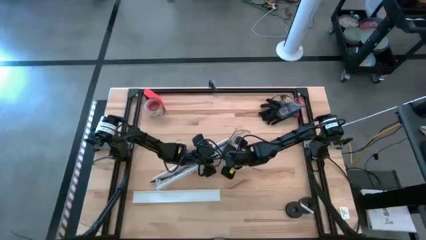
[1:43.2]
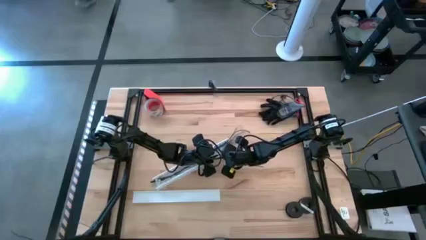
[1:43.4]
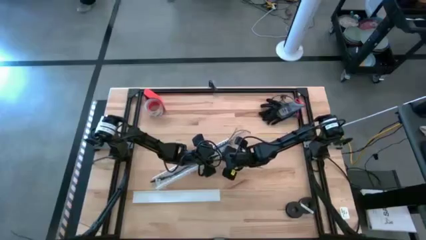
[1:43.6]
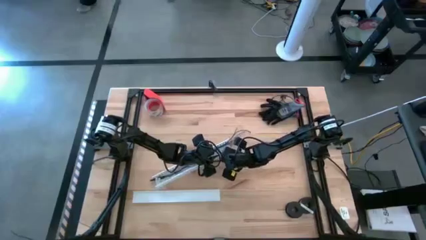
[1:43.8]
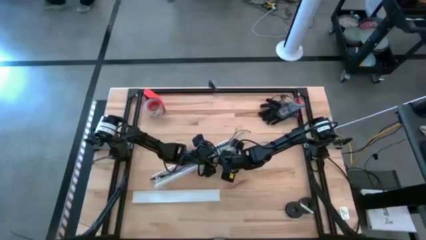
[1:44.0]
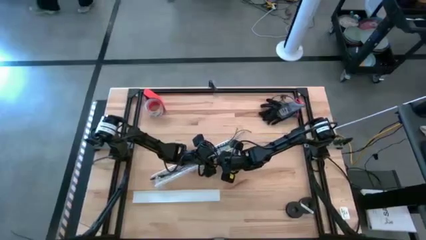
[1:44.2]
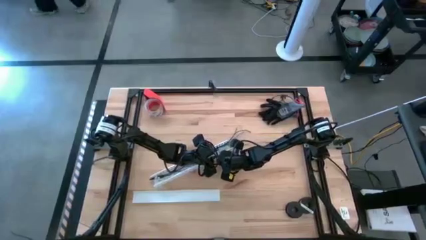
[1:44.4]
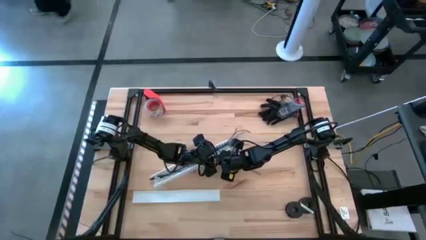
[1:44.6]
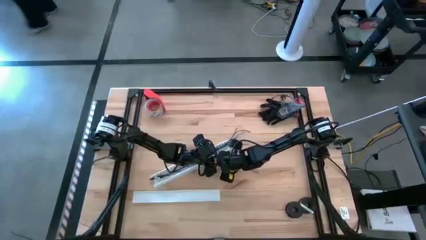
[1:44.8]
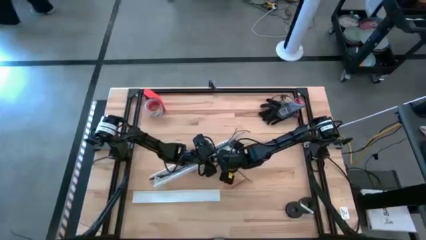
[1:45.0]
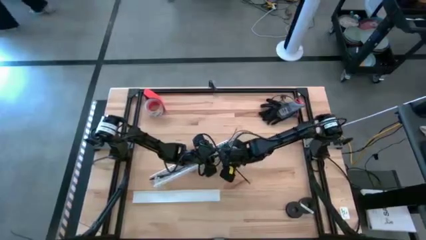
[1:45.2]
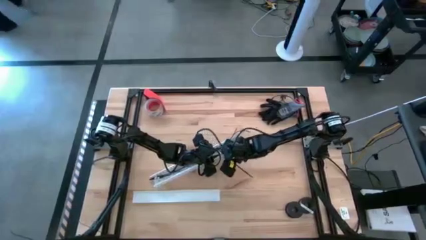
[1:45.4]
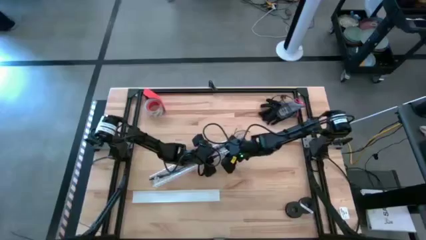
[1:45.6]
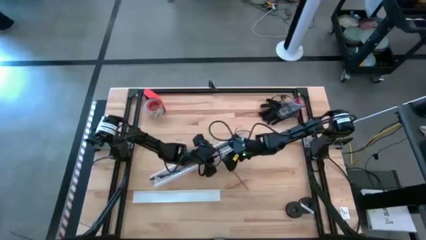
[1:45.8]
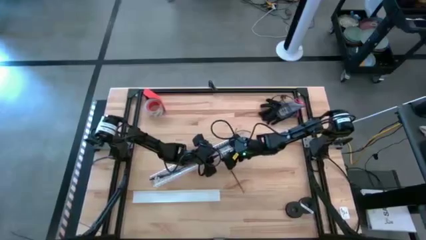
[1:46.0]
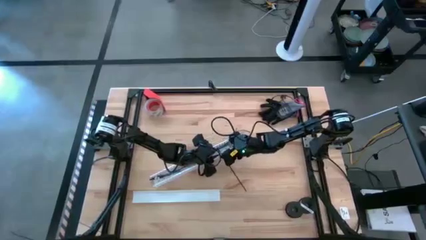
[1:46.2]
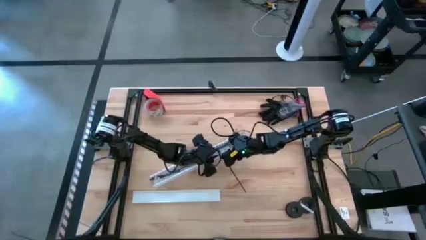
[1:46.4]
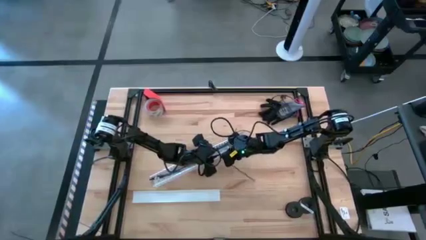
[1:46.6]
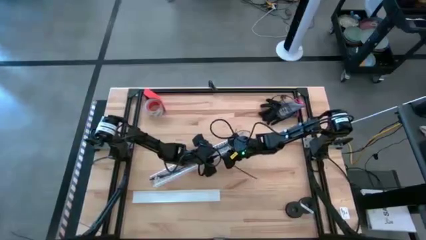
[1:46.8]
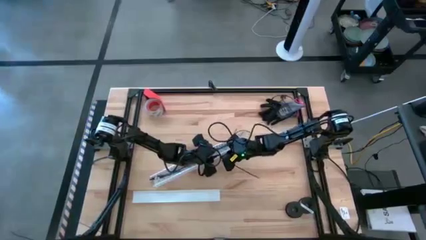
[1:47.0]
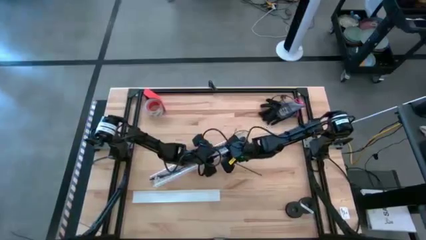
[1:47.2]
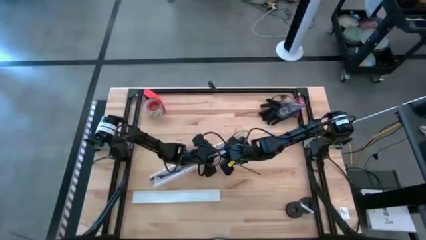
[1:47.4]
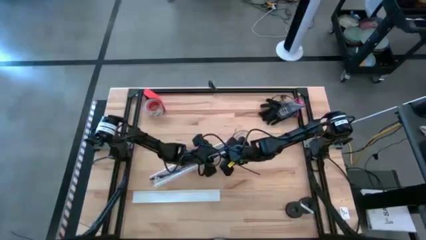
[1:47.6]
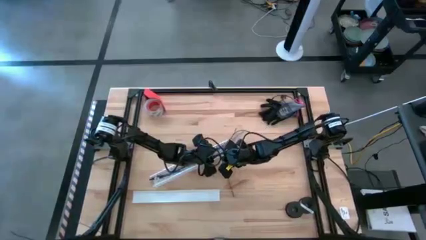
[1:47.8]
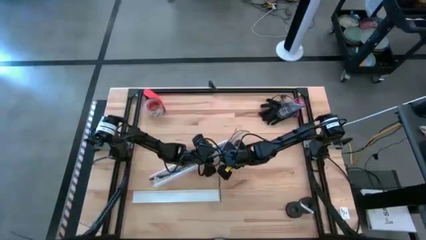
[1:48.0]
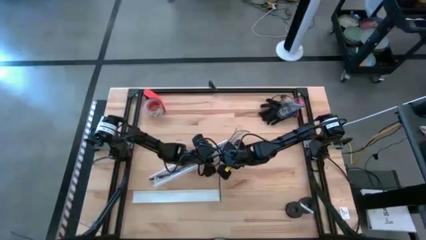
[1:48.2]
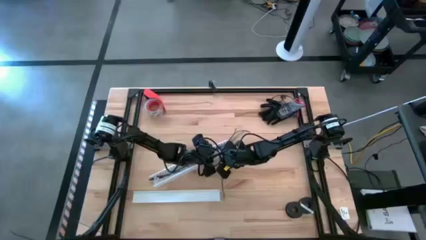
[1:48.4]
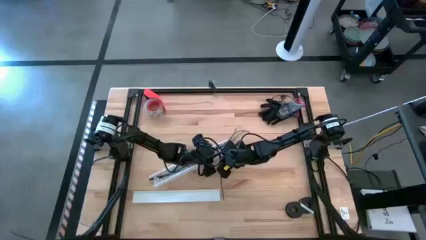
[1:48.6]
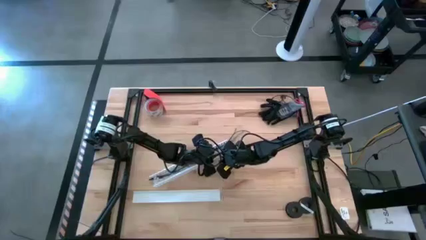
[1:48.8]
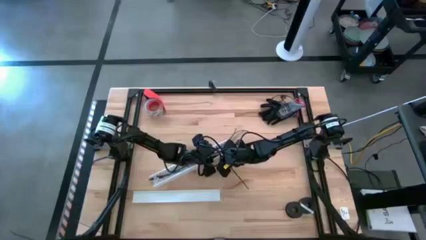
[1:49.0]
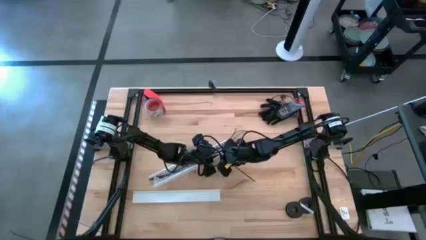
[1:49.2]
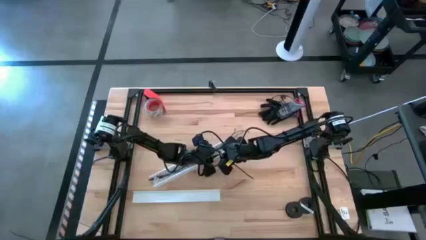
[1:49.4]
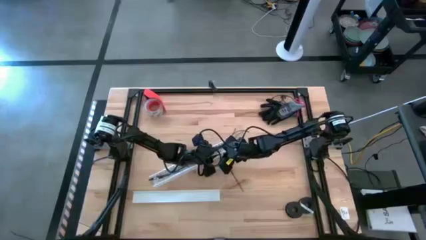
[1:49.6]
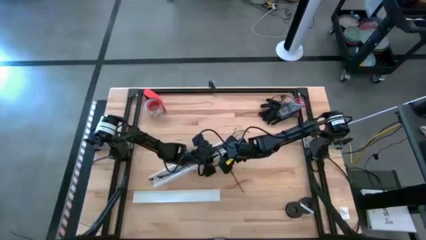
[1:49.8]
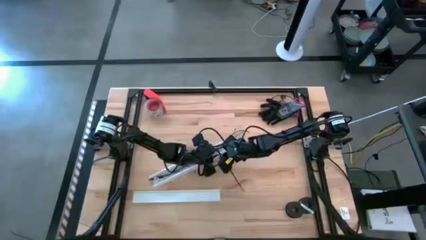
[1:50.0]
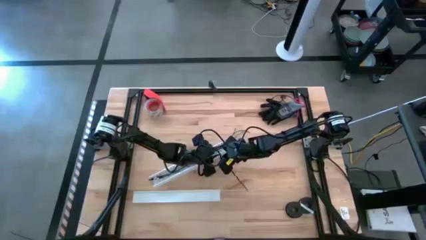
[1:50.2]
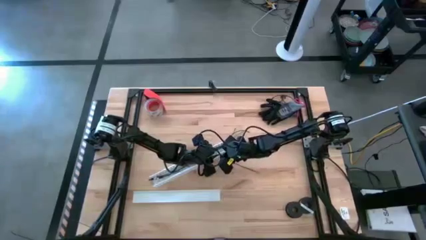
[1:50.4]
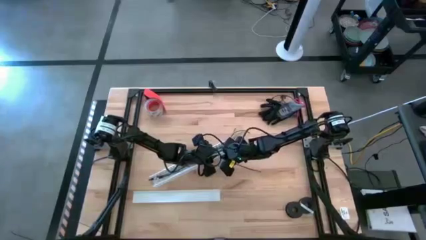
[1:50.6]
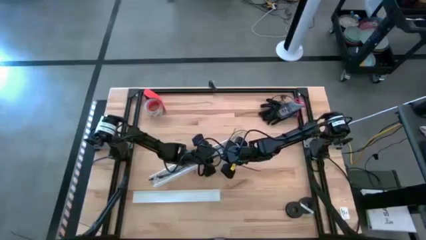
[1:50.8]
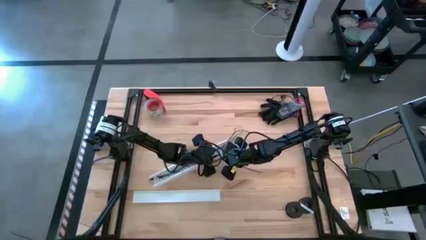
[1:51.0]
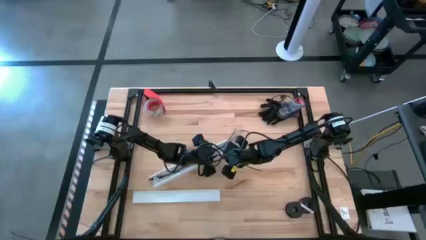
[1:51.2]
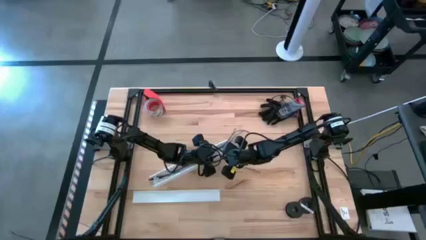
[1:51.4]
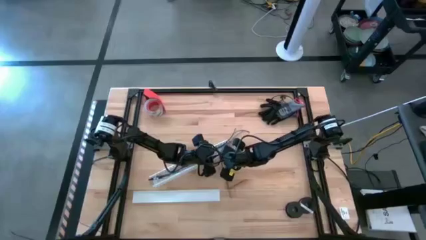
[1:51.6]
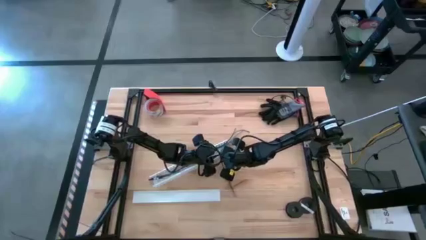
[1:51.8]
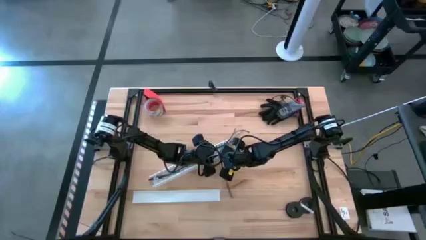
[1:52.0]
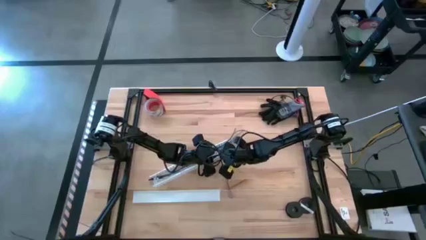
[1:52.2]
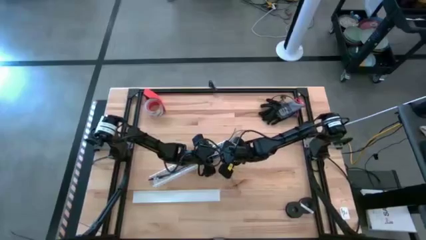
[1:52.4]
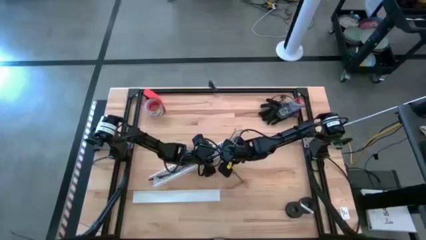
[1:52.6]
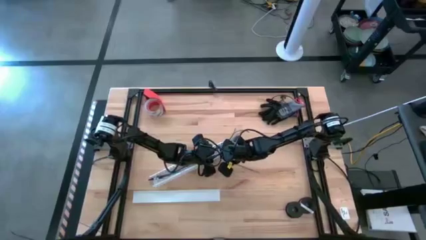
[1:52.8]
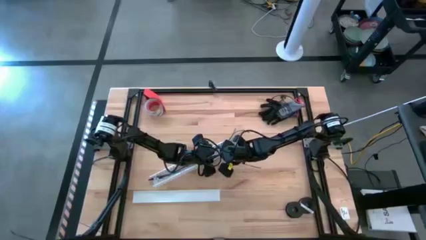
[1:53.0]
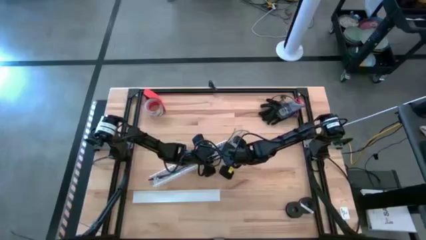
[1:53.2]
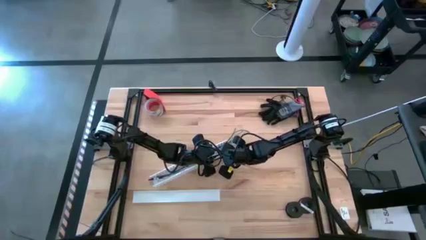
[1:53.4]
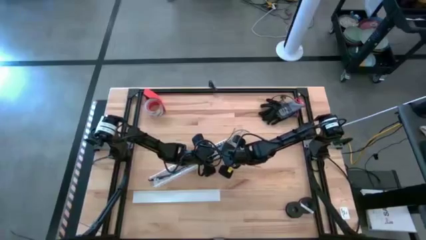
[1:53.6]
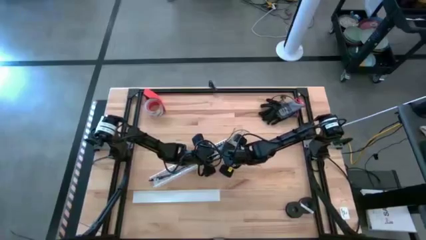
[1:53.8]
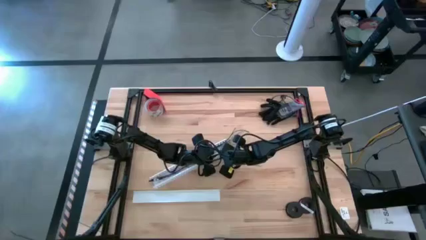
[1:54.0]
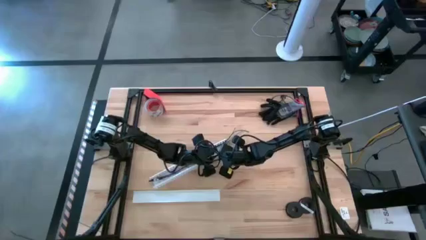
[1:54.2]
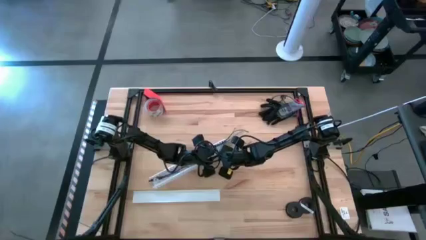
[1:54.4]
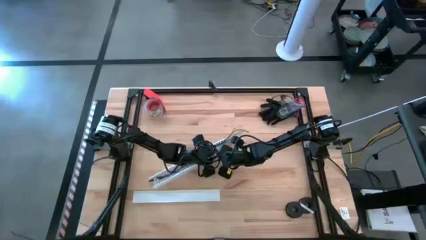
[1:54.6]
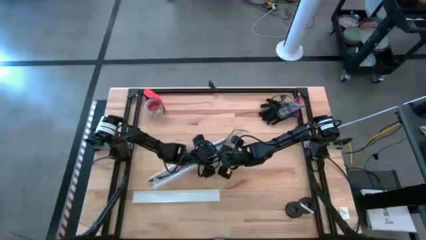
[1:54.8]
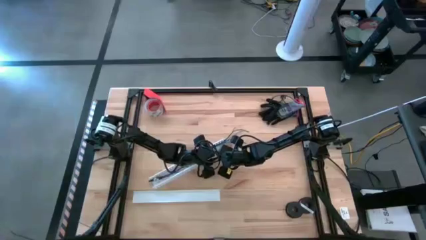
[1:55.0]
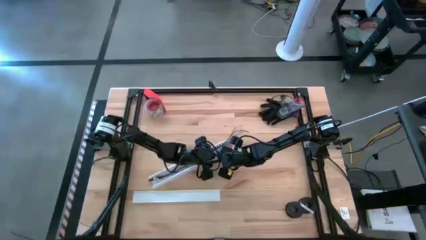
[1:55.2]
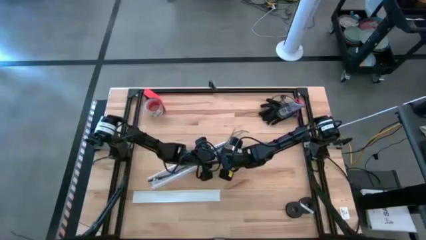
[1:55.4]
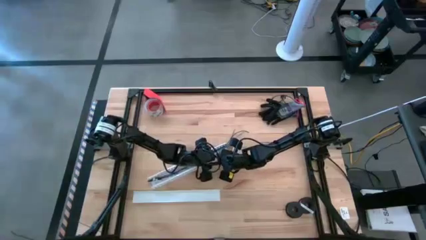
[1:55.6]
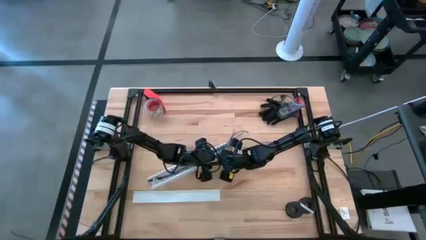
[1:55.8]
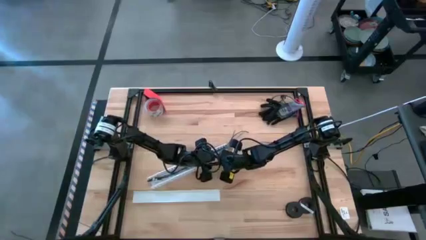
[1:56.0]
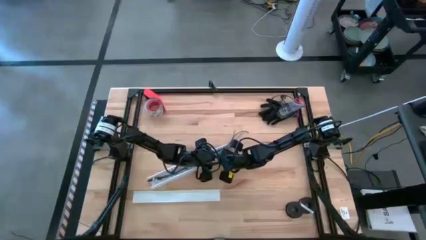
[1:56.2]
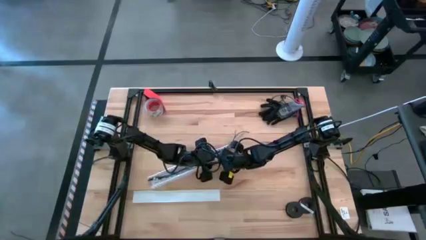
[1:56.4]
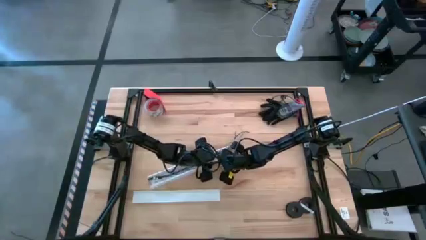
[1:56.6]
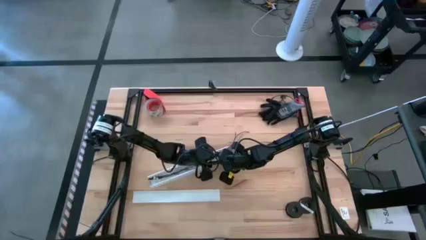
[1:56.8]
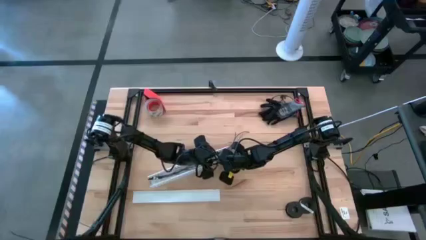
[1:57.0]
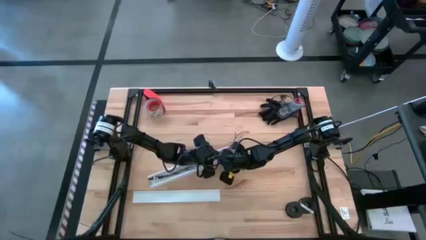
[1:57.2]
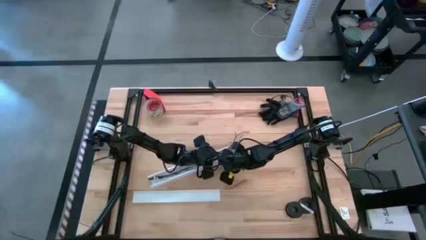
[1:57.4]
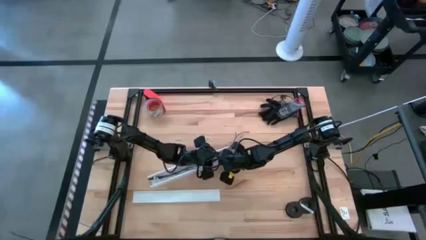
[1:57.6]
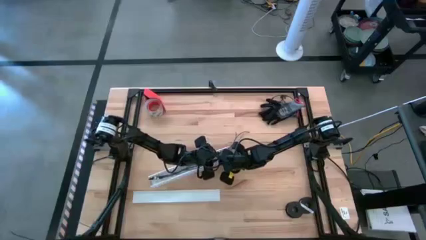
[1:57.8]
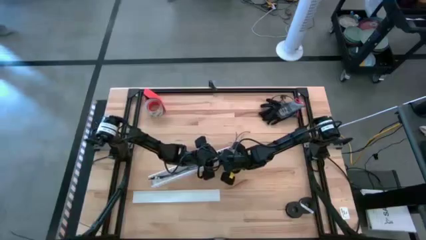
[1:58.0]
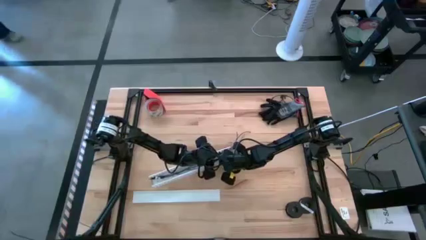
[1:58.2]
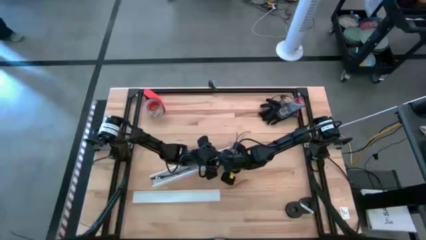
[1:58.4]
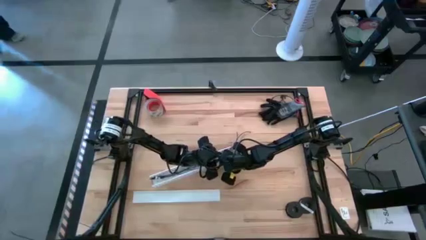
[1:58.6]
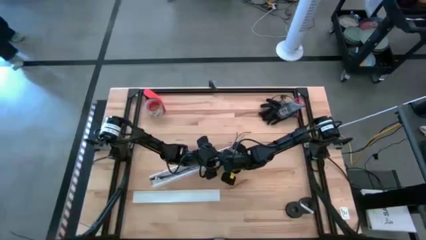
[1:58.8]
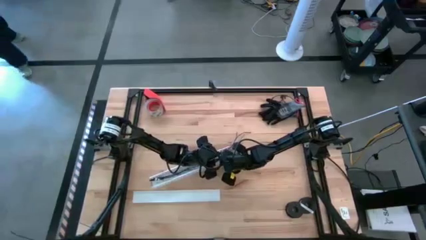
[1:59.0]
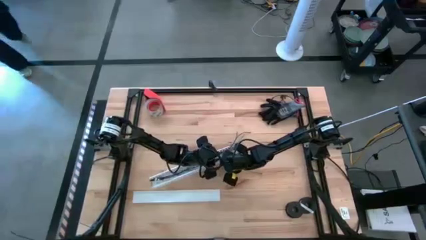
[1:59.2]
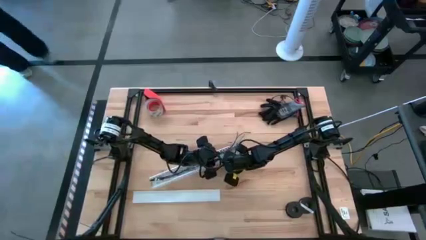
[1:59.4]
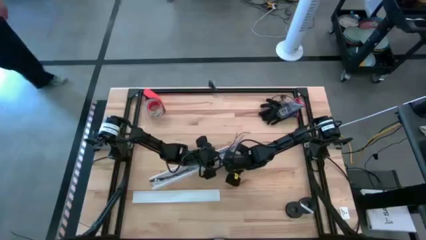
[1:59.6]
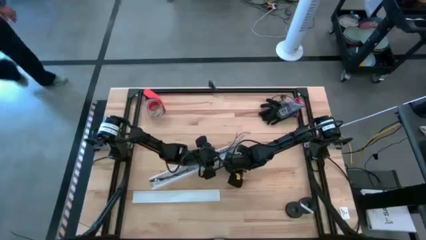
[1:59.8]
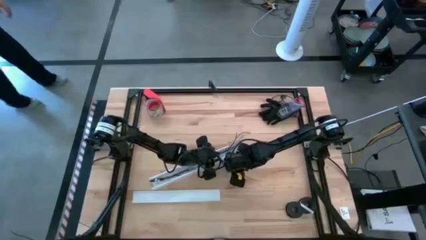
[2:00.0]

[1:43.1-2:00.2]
Task: Ziptie cables
Put the zip-tied cables in the cable duct
